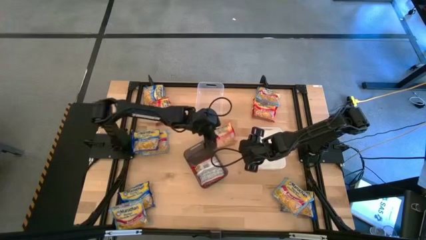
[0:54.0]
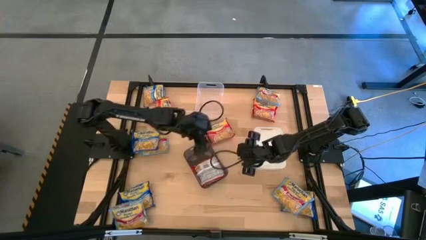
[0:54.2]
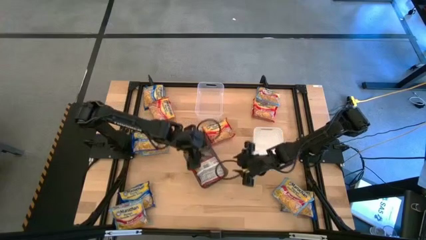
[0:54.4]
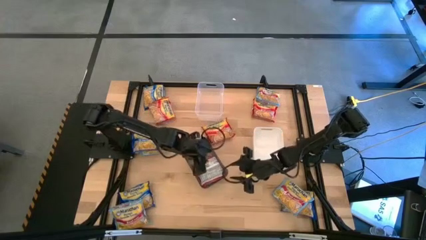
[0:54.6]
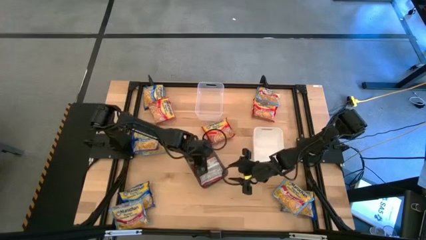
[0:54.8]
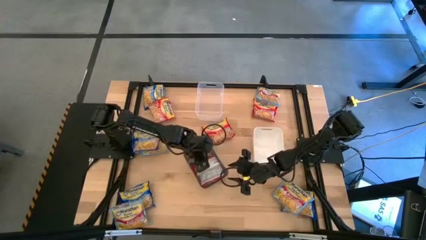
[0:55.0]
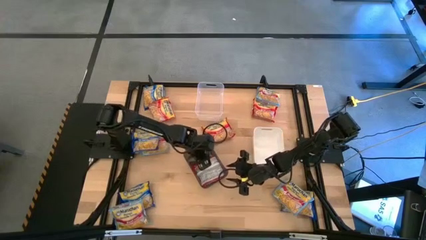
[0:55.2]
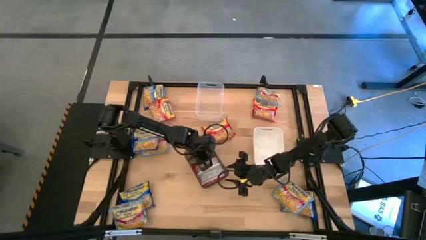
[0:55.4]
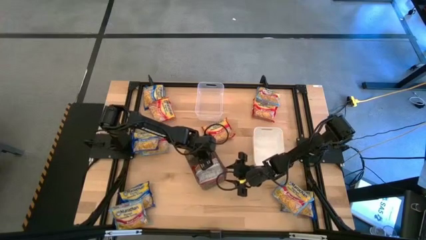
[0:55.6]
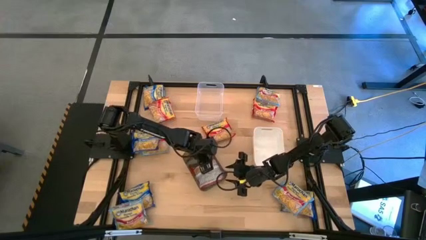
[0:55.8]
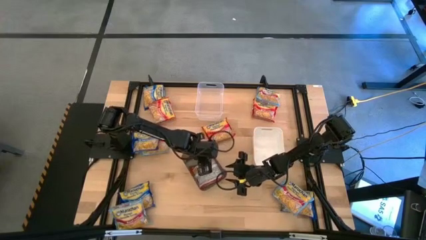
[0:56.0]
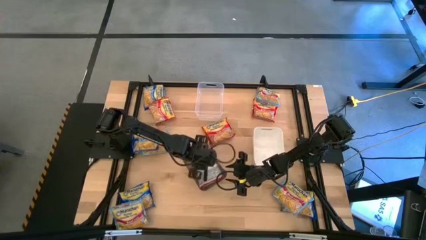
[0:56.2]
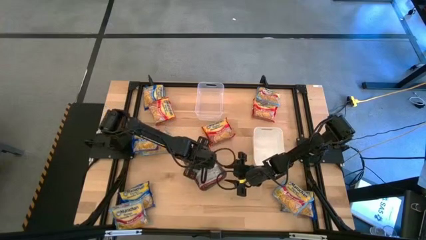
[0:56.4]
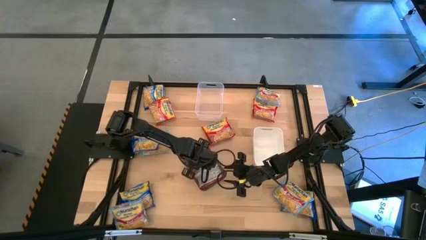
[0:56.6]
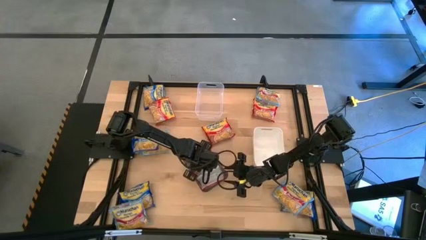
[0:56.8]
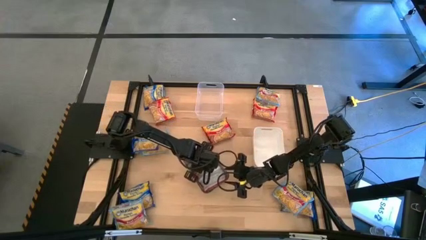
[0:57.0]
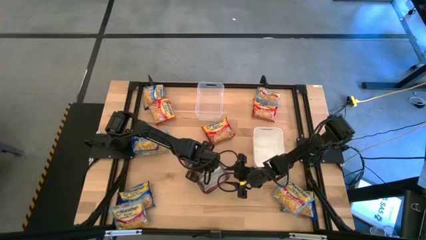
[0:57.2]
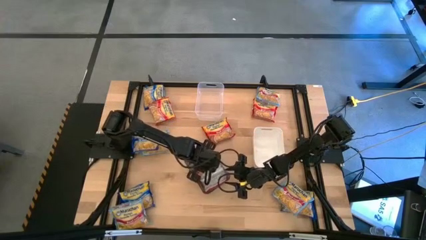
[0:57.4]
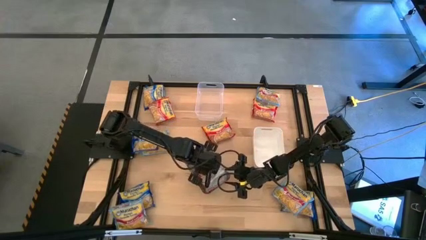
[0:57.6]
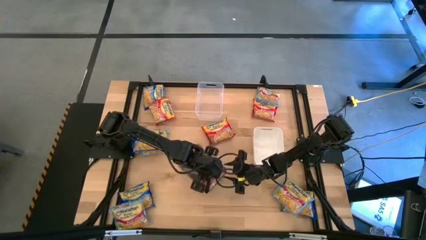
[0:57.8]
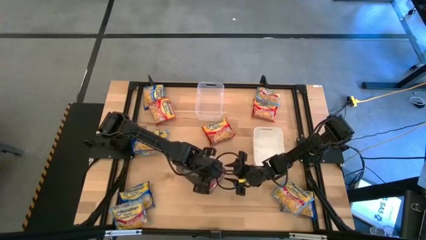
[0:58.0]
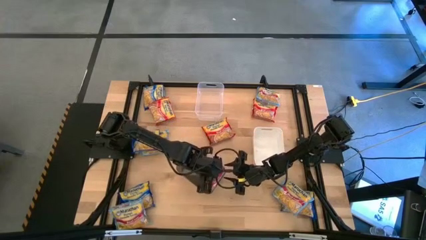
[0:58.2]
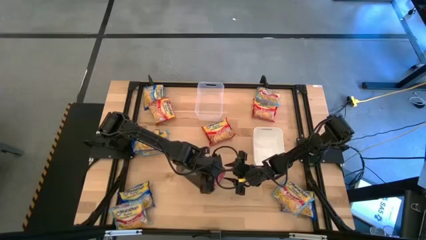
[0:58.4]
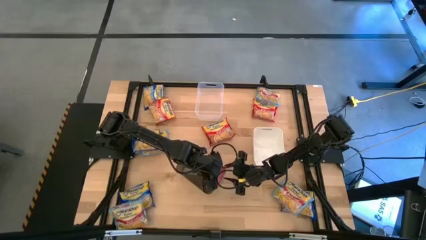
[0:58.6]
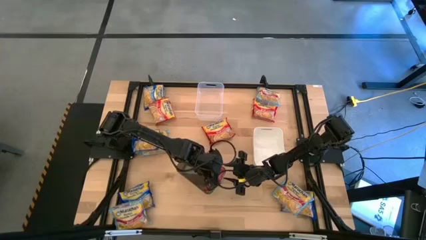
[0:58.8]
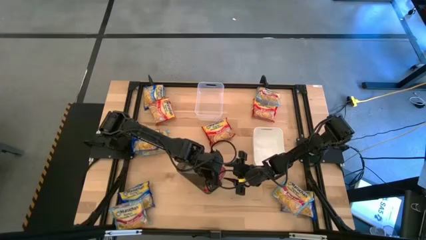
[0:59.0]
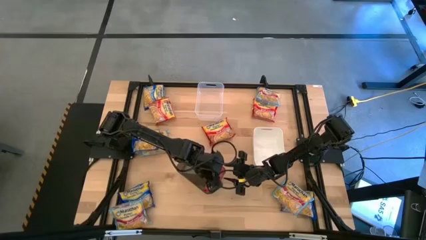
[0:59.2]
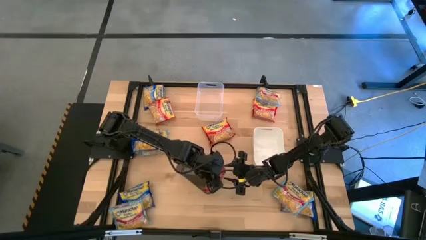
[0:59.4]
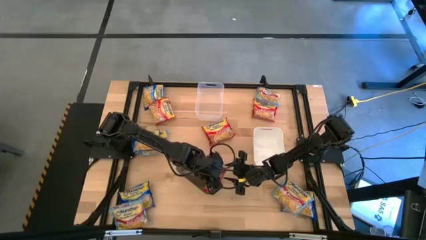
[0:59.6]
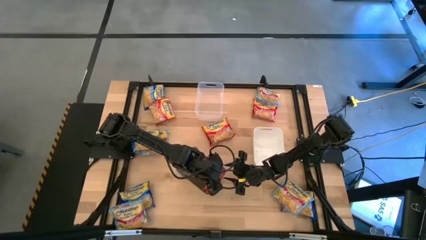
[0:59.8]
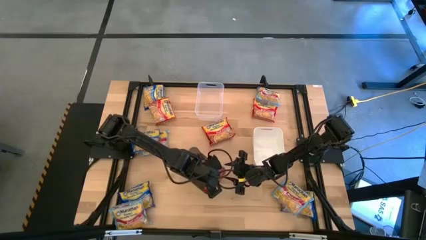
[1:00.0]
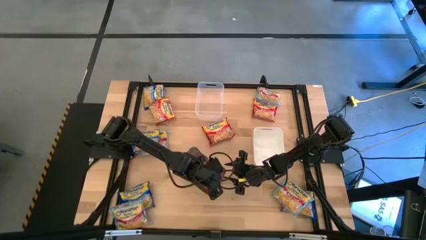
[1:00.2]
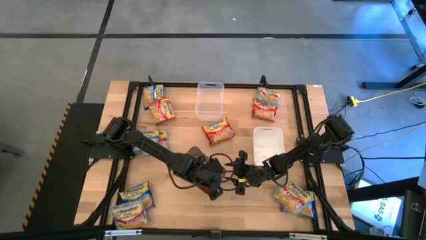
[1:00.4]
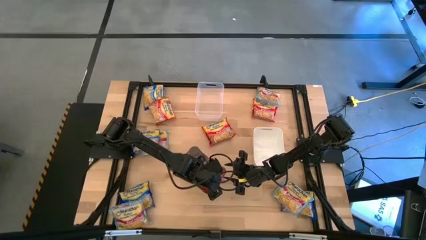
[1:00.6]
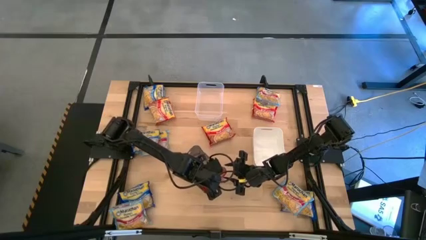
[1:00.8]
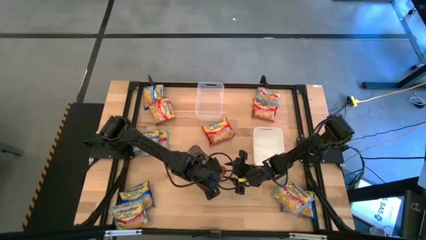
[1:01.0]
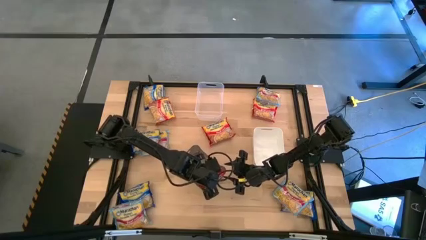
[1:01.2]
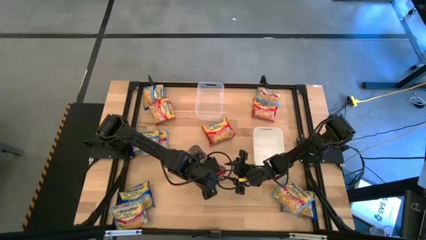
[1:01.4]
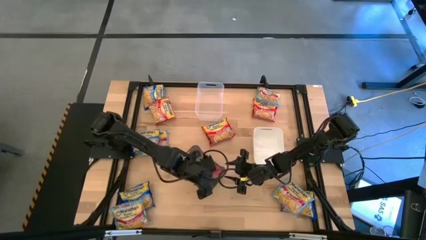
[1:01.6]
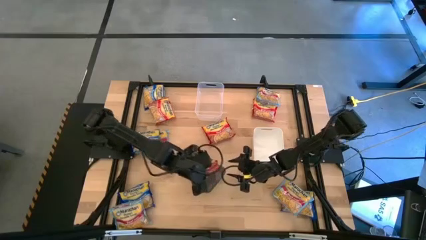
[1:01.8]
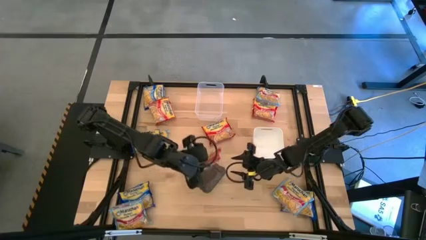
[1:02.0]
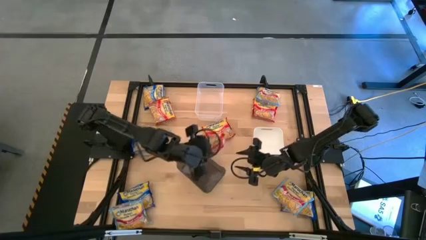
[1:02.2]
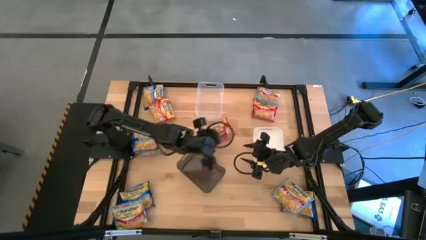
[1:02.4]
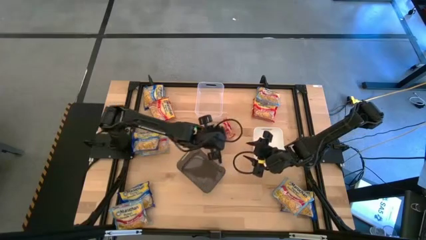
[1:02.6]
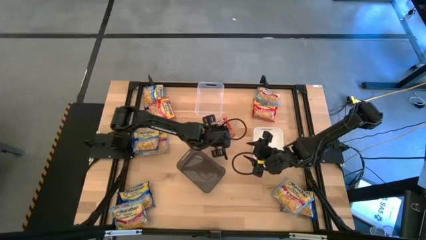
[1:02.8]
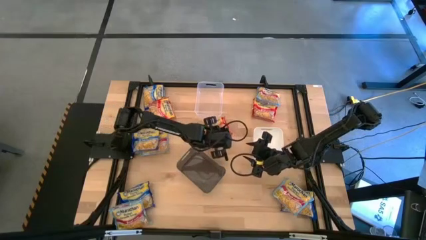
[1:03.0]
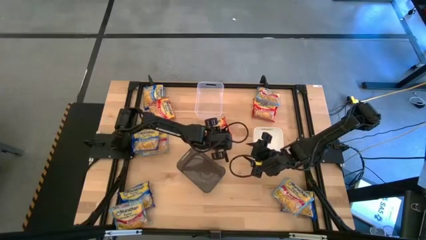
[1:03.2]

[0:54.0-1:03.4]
Task: Sort Maruchan noodles
Remove the red noodle pack from the gray bin

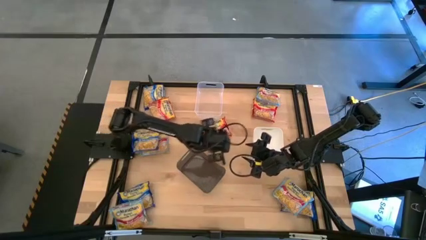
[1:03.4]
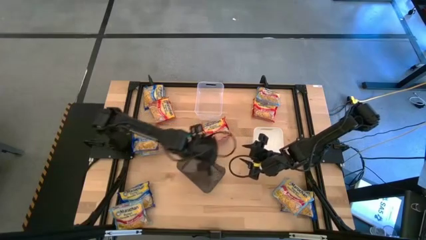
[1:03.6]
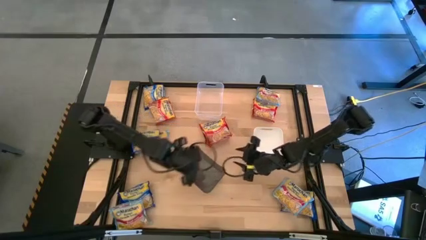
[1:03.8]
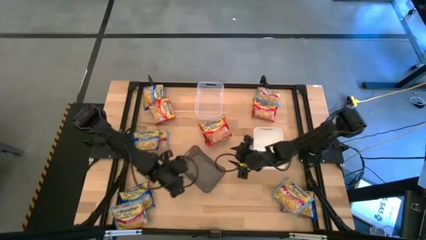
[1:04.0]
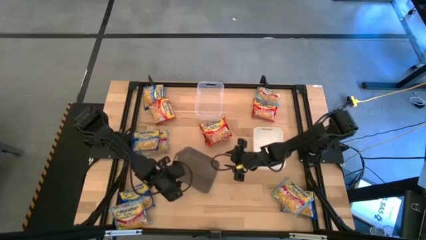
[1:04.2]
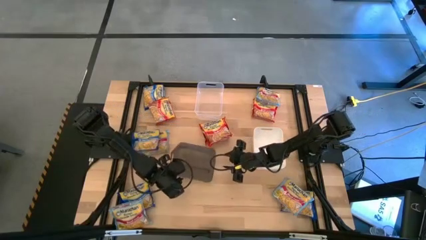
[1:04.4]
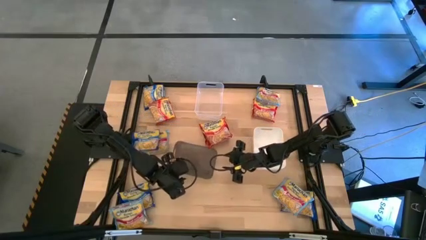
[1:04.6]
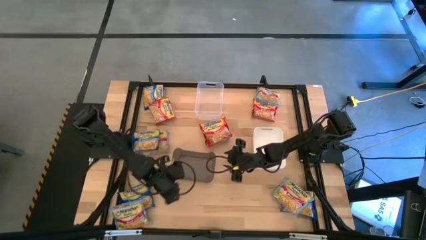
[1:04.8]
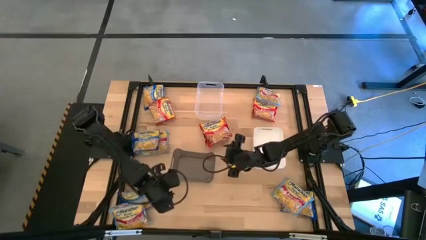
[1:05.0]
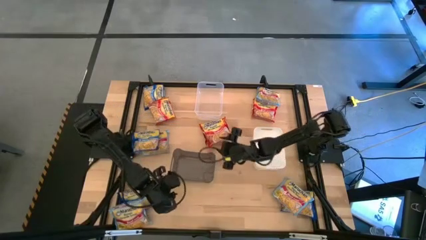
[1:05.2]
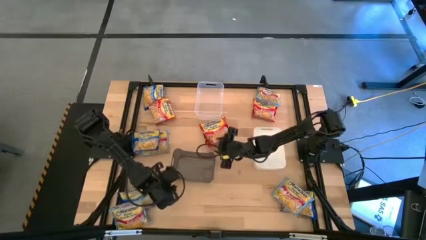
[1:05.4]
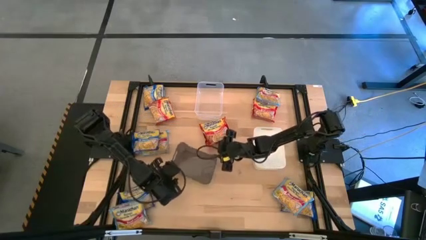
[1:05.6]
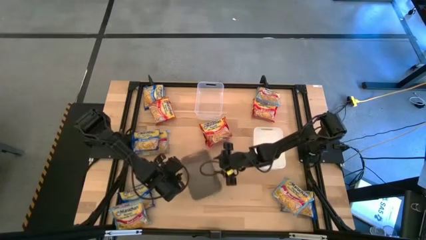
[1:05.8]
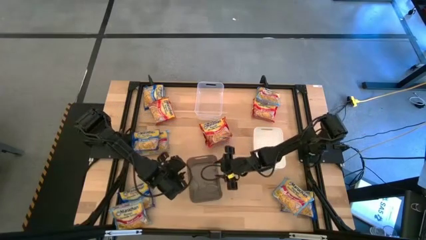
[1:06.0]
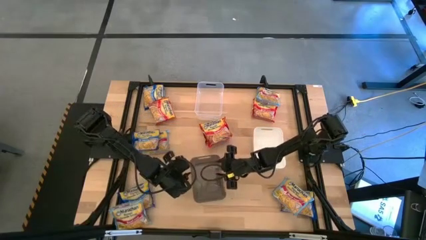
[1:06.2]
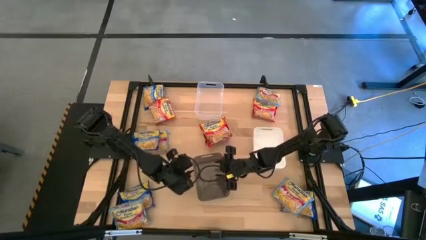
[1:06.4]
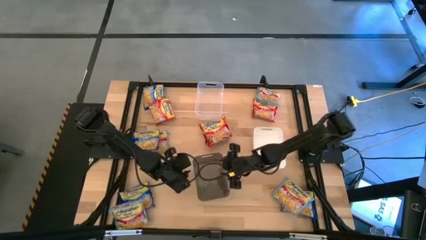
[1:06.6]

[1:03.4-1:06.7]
Adjust the gray bin on the table

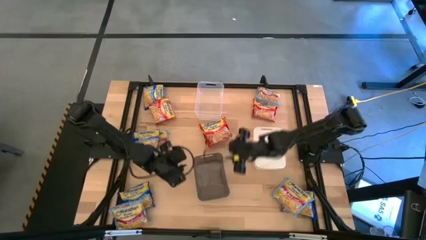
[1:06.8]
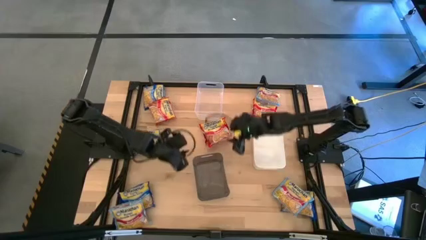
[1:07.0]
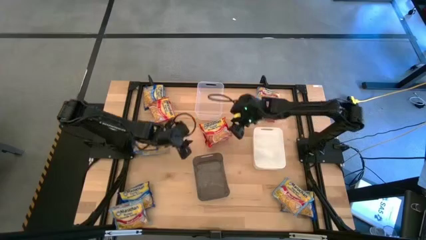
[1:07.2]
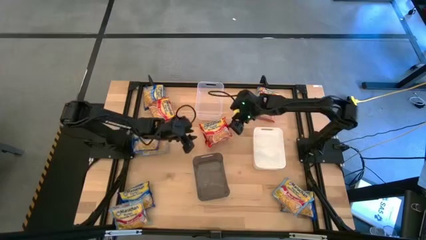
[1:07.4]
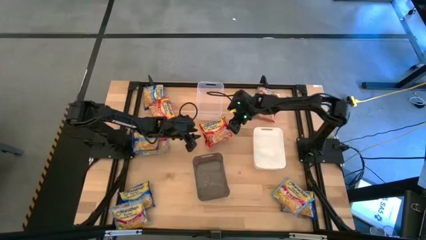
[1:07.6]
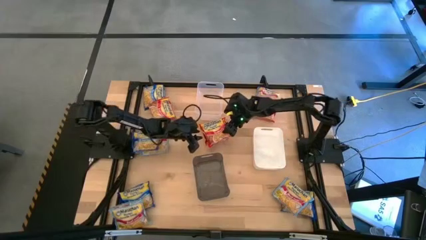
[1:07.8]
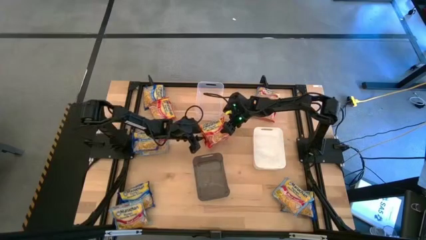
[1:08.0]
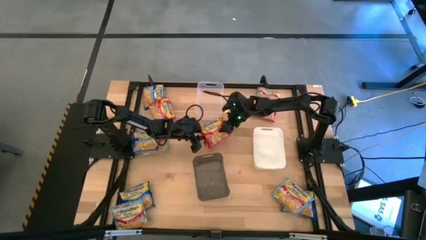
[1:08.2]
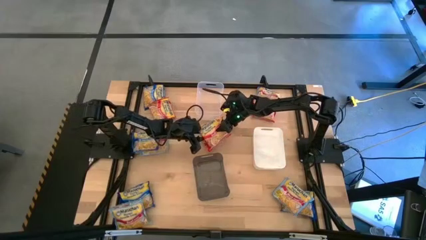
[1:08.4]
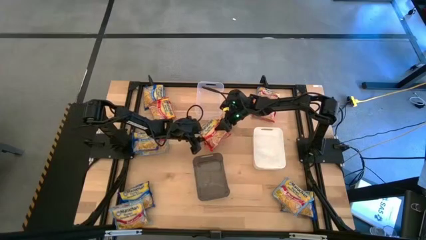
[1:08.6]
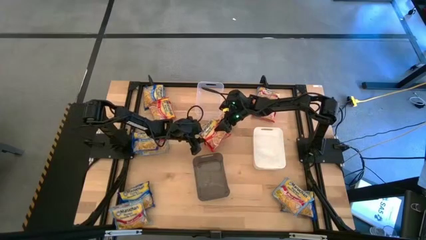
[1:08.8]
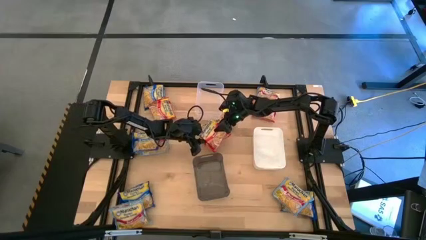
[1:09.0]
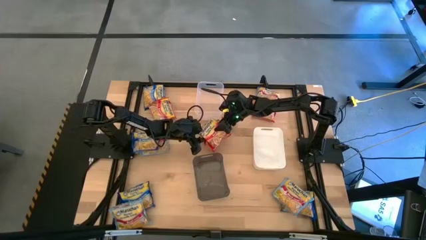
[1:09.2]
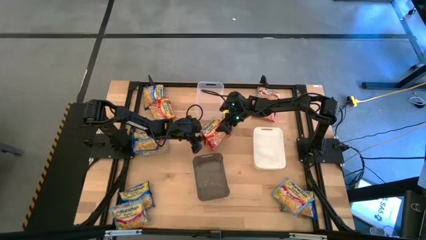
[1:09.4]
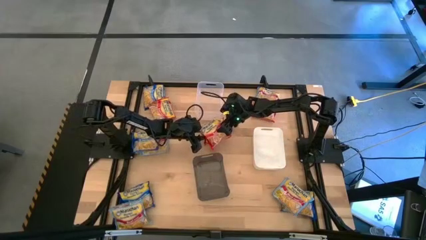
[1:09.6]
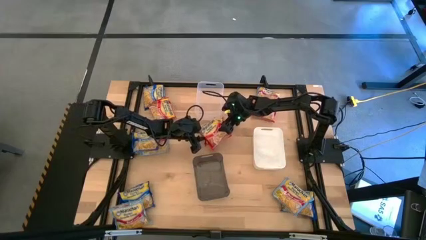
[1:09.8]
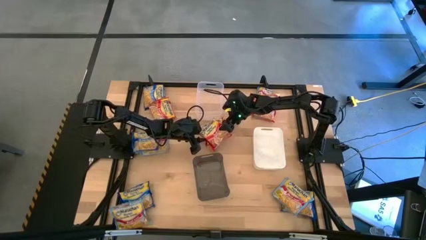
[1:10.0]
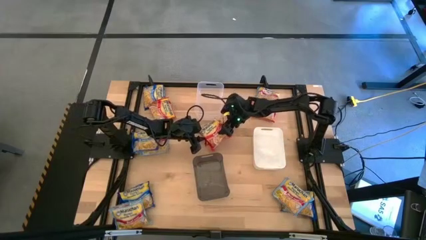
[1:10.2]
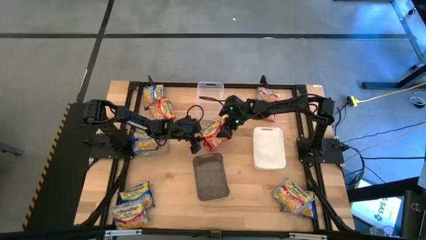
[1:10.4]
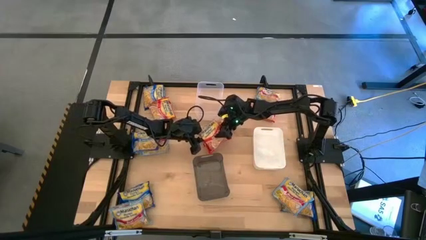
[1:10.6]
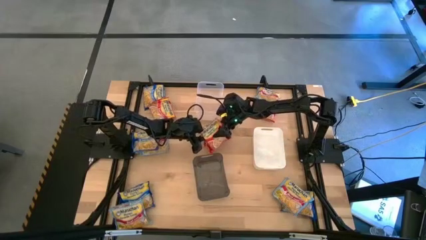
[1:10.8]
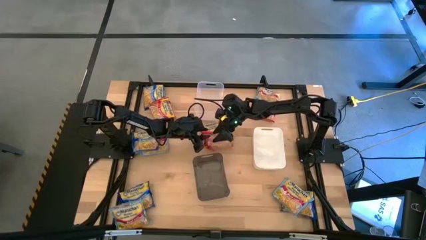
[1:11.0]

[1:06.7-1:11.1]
Put the red noodle pack into the gray bin
